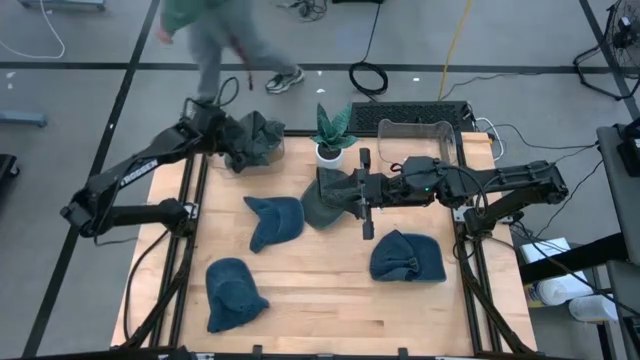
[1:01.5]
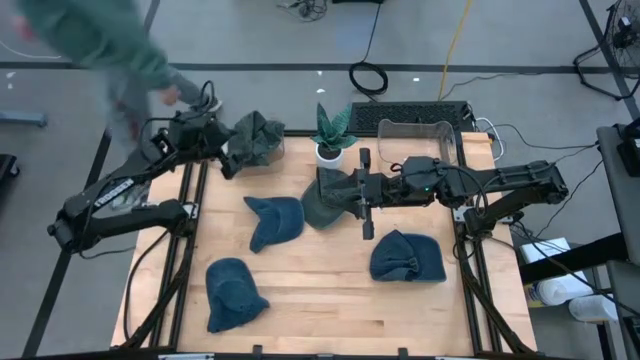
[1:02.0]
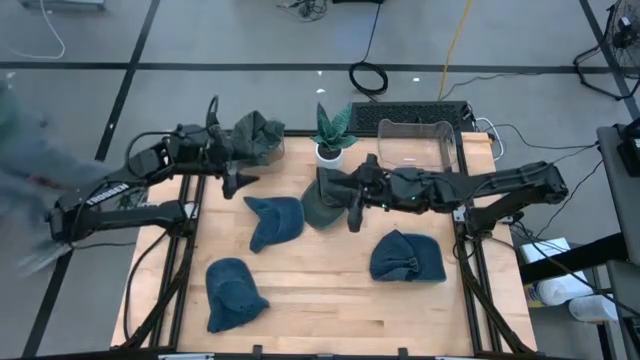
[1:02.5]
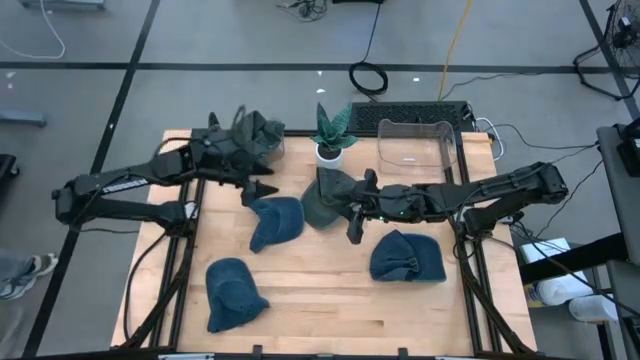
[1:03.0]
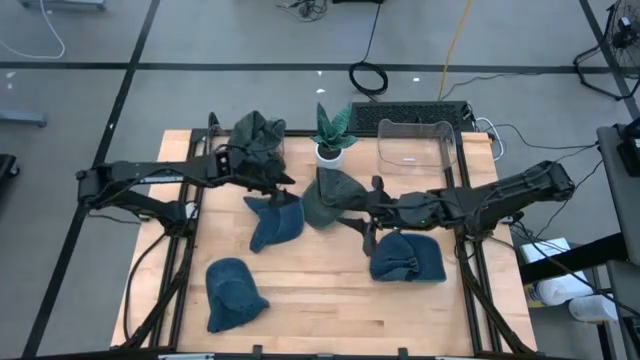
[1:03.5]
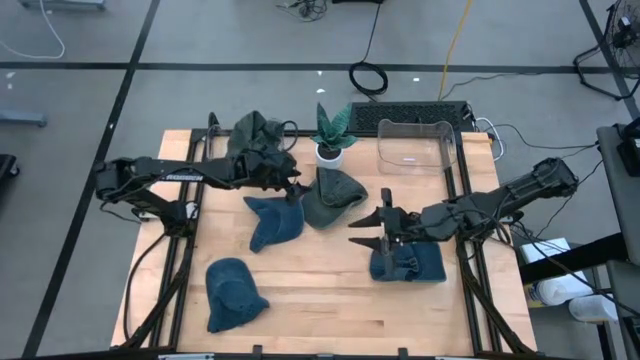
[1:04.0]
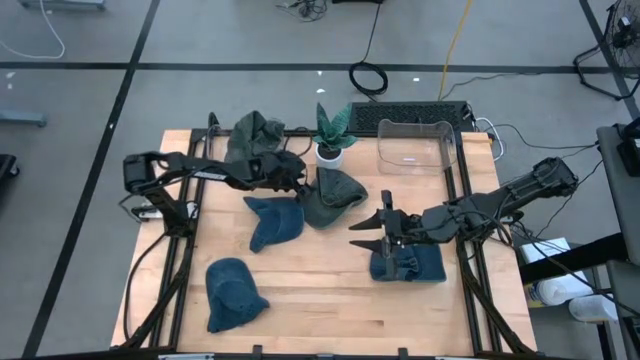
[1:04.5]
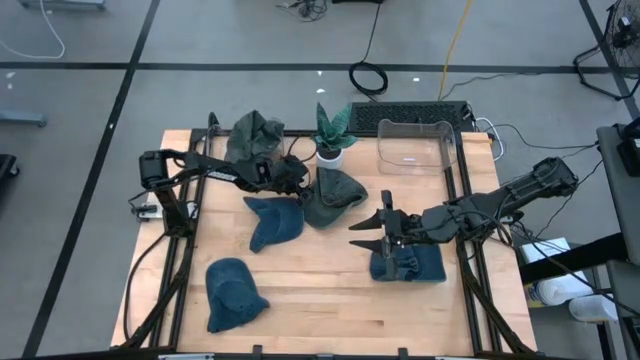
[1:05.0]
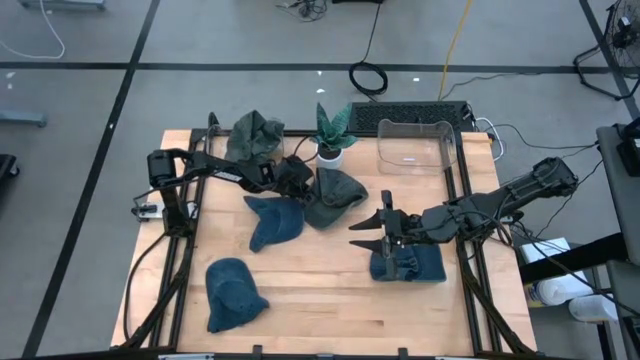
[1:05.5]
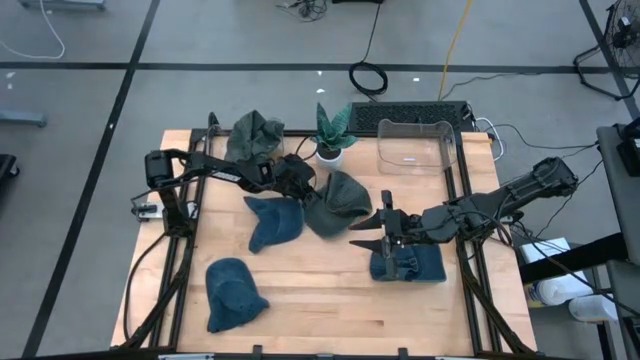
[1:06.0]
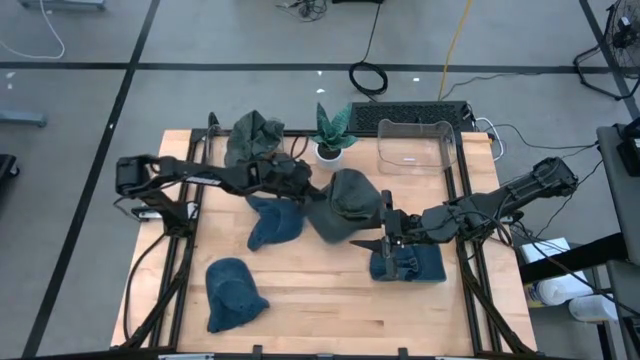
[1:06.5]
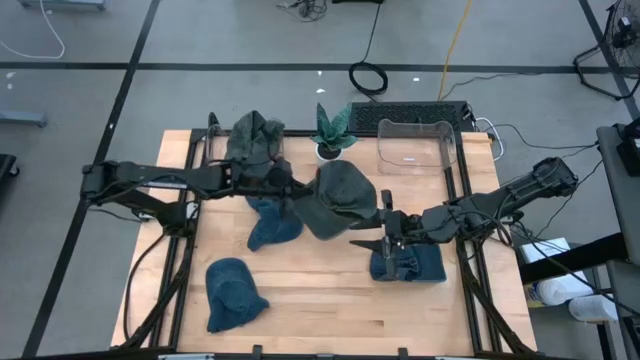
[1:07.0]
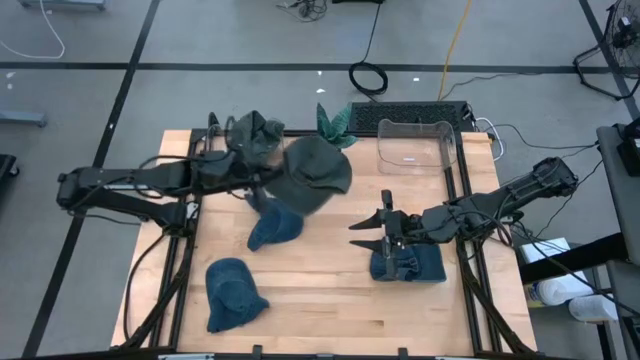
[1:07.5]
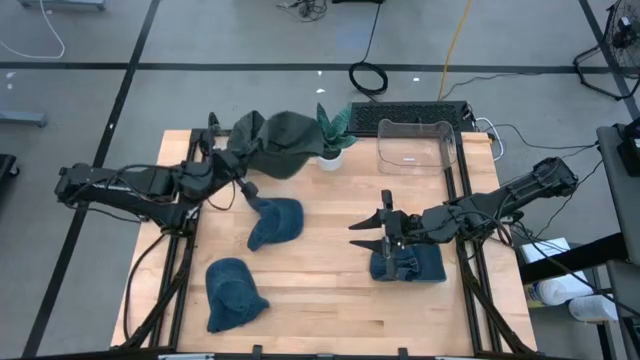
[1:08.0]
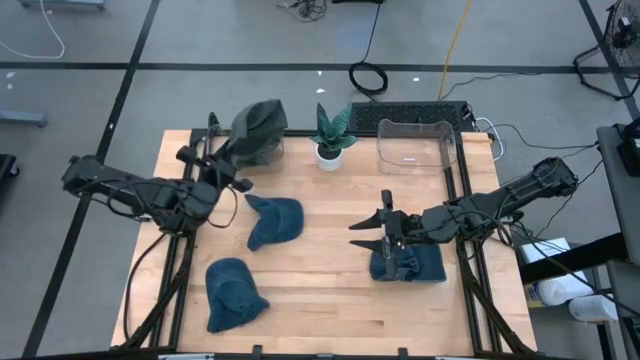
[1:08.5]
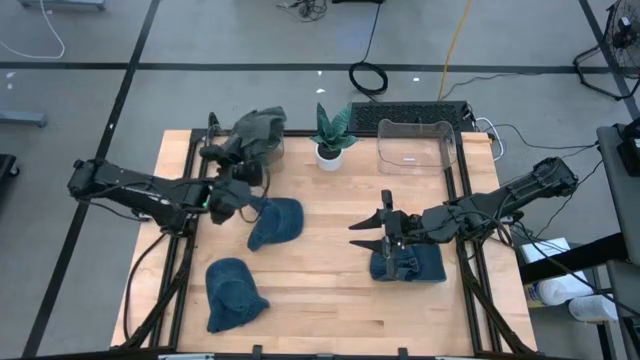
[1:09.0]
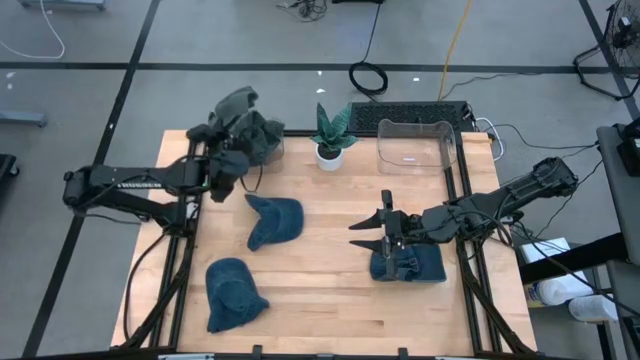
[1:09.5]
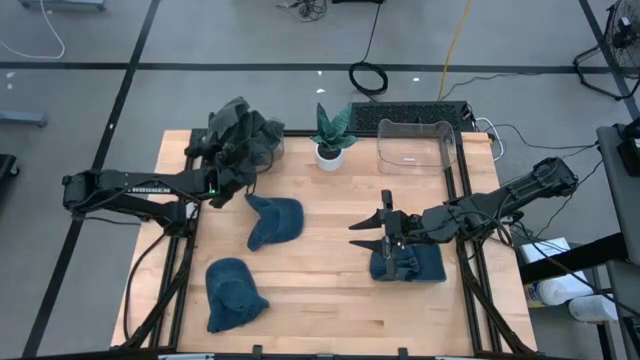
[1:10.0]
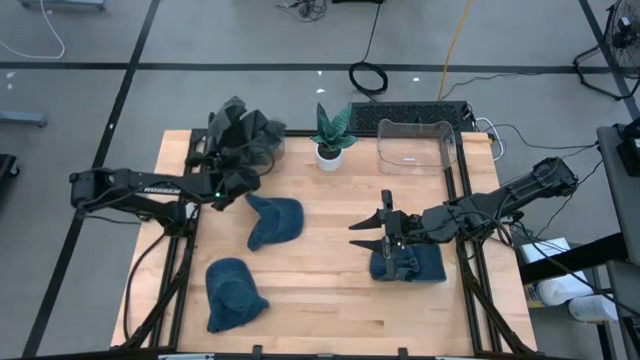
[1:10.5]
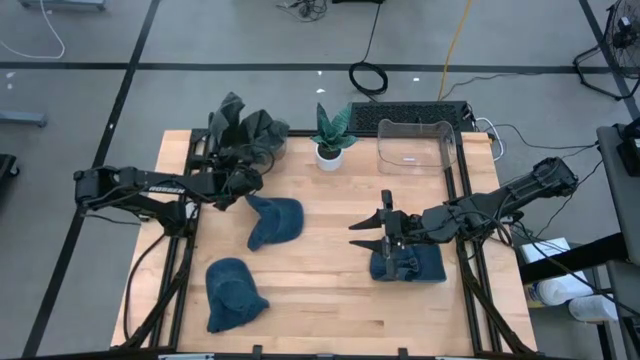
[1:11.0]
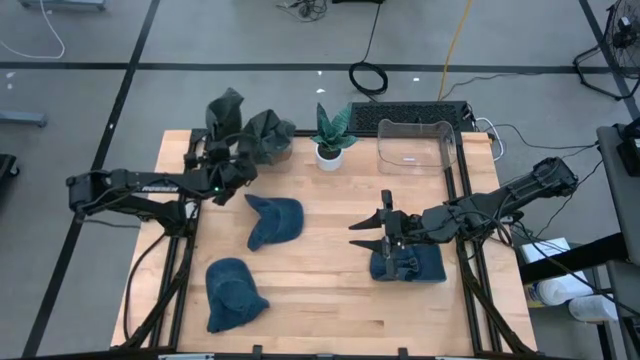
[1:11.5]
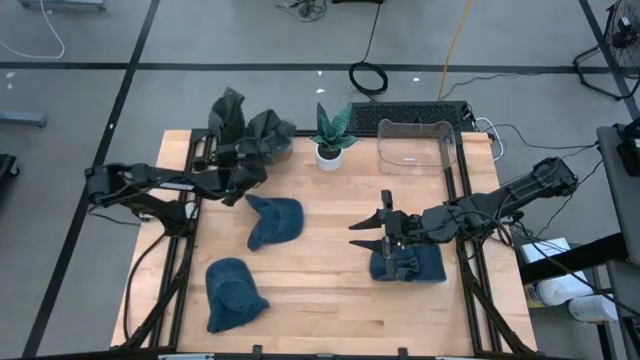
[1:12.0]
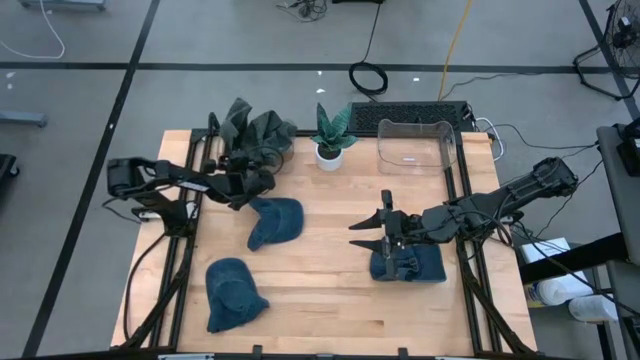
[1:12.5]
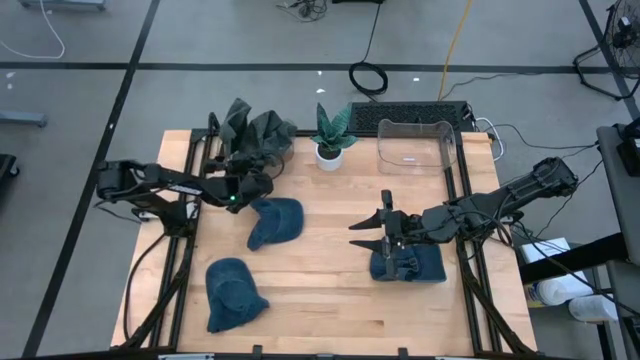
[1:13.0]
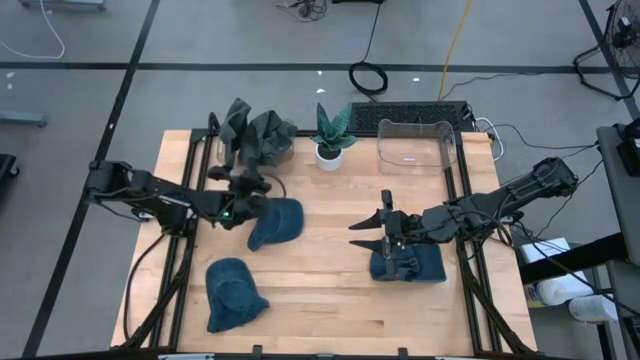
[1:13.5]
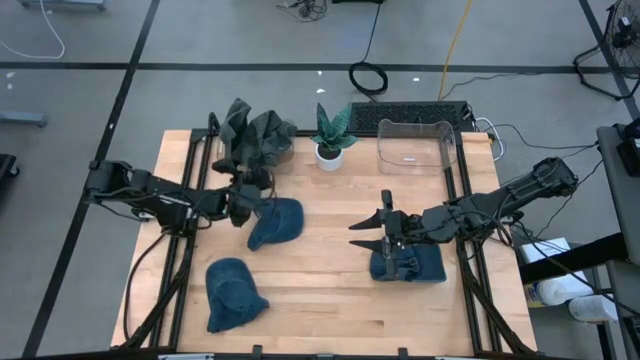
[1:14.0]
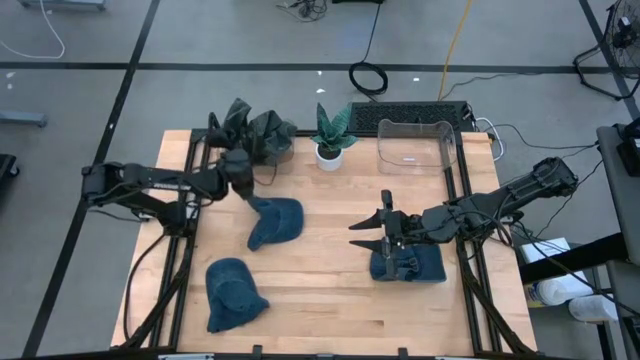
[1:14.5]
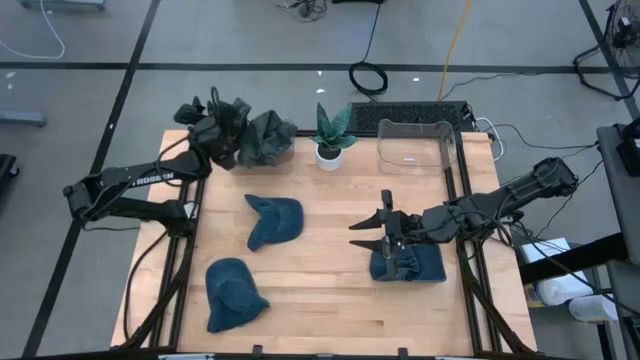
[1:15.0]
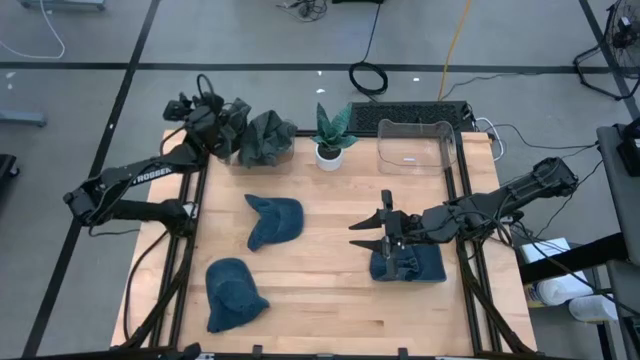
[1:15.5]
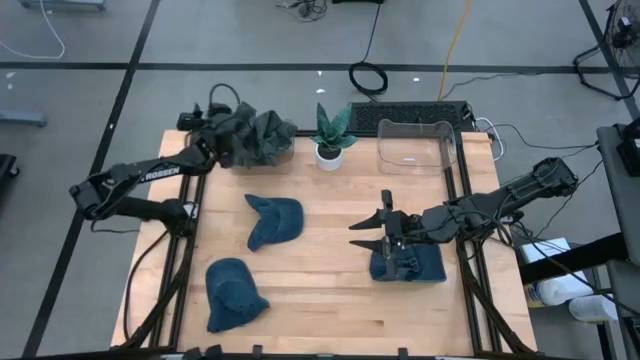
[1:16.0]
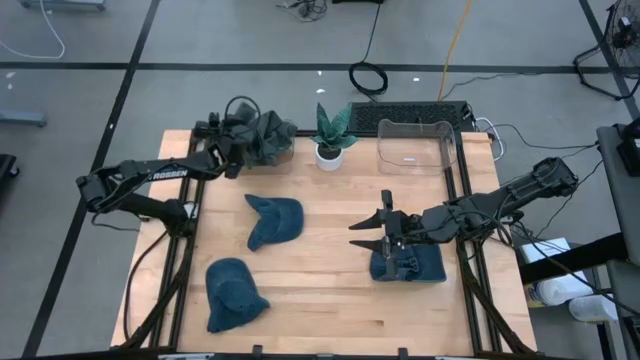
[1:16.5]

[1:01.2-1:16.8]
Task: Pick & Place hat
Put the green cap into the left transparent bin

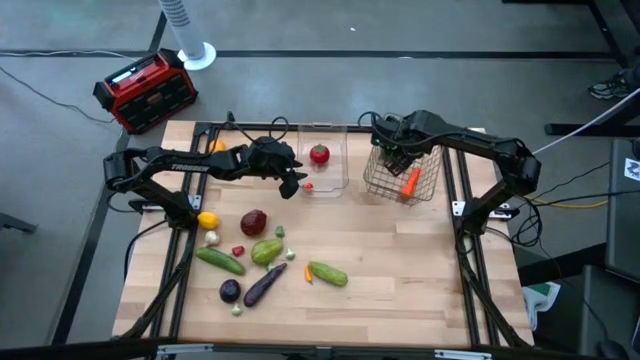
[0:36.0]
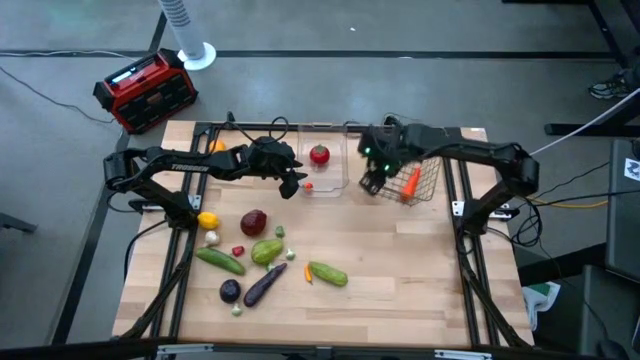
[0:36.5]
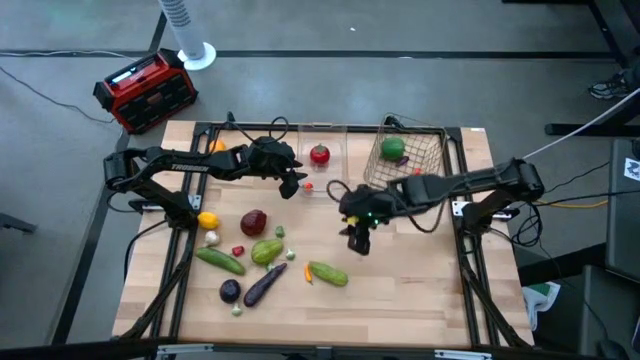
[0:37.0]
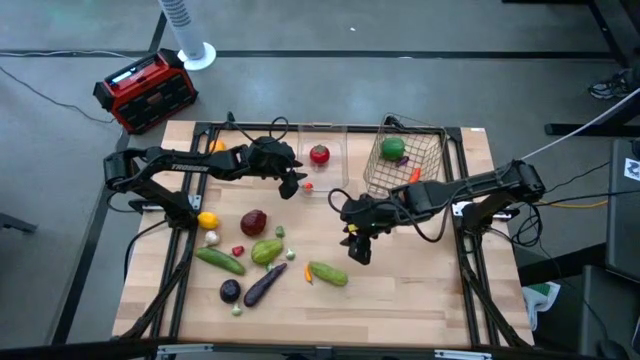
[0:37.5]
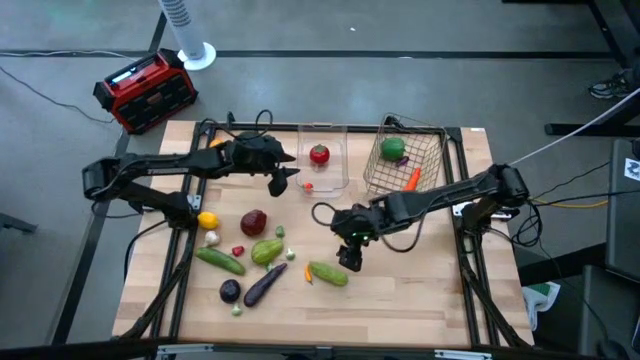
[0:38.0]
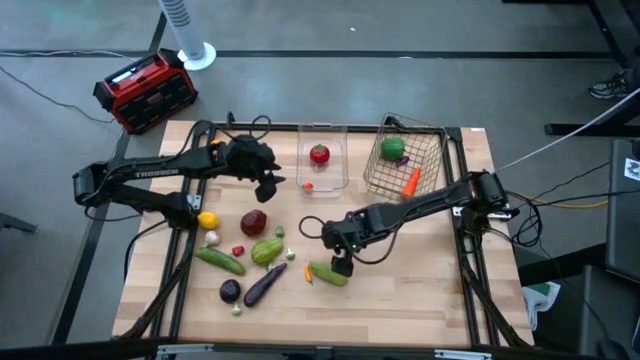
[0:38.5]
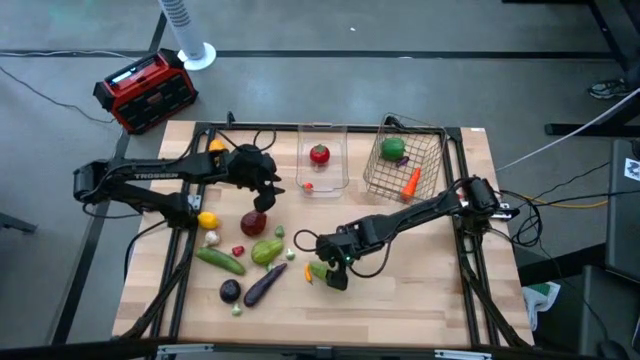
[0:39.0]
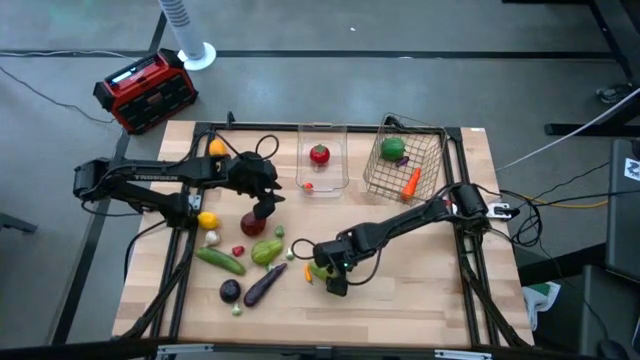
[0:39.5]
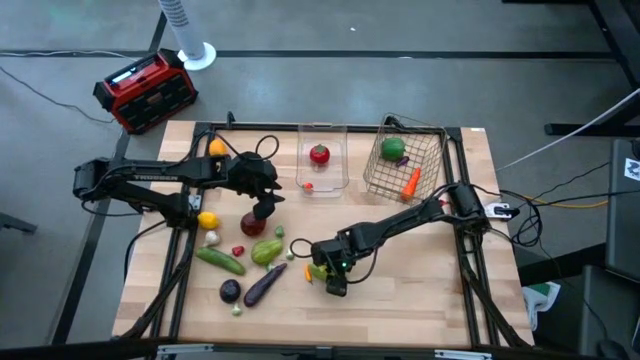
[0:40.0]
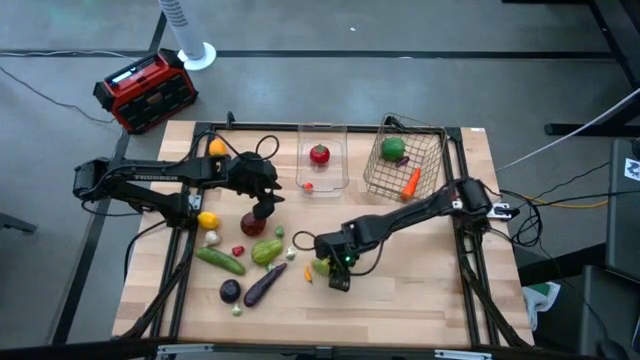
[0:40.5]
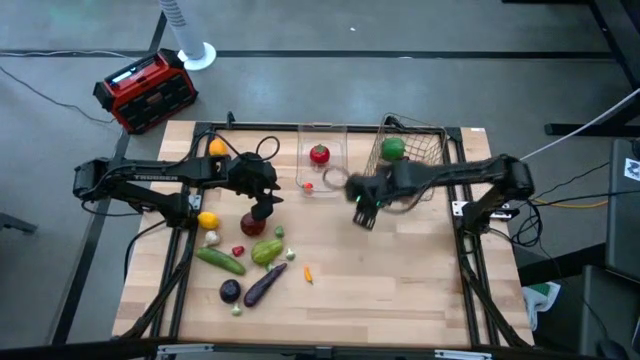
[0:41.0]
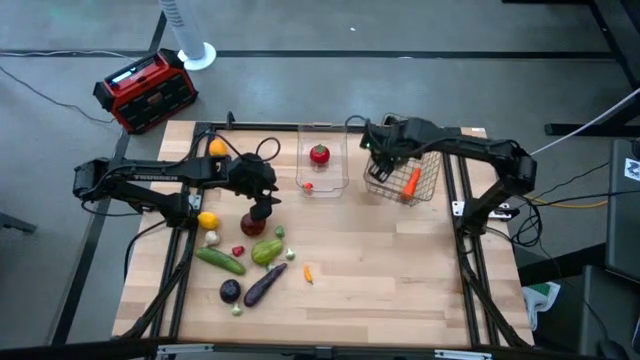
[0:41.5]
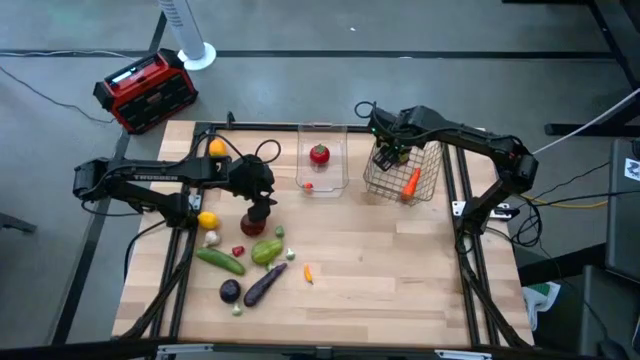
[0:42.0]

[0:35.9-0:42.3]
Task: Sort produce into baskets
Put the green cucumber into the wire basket
